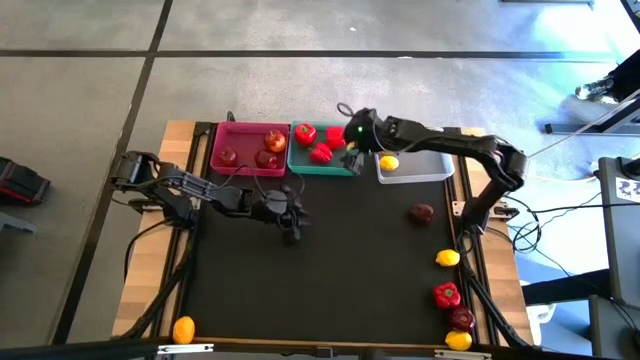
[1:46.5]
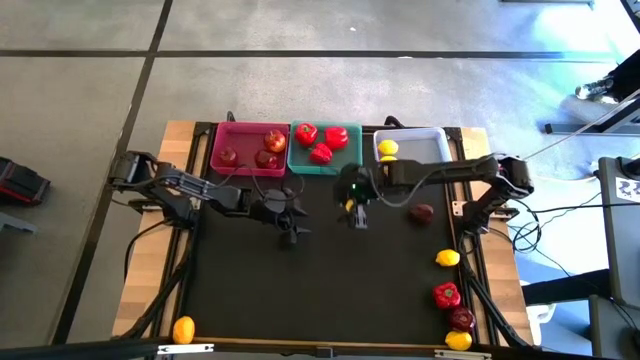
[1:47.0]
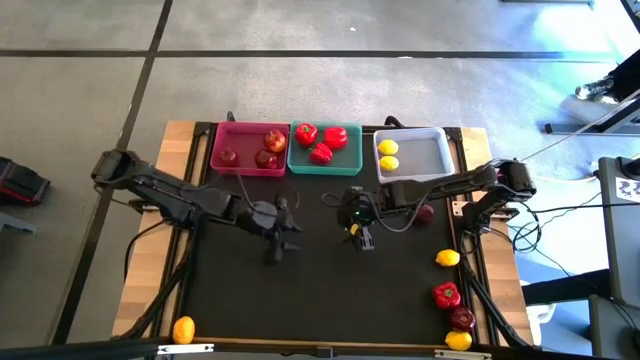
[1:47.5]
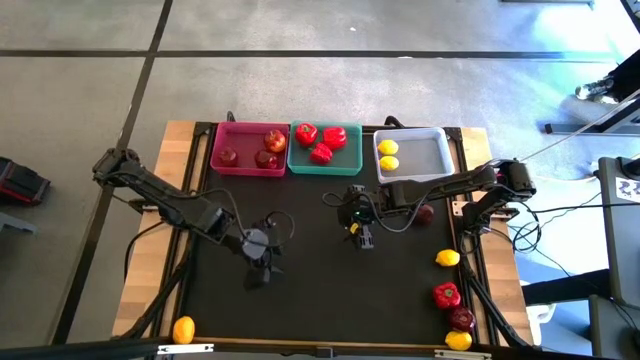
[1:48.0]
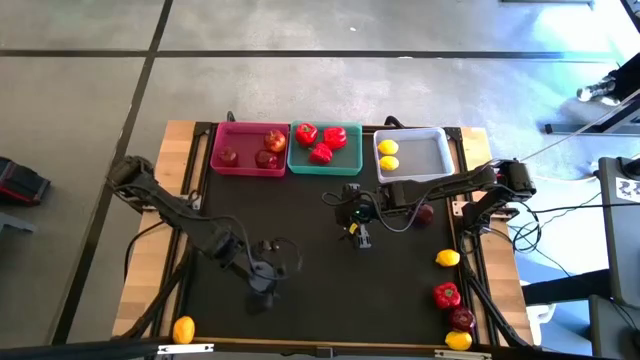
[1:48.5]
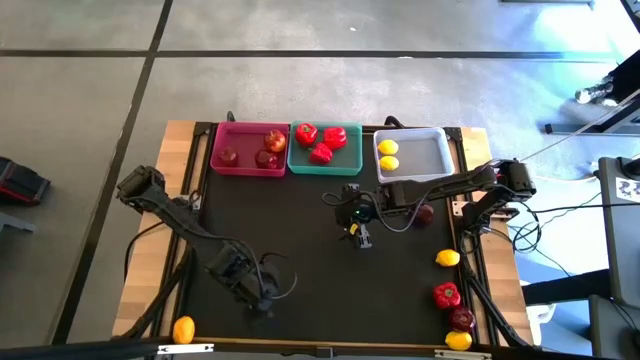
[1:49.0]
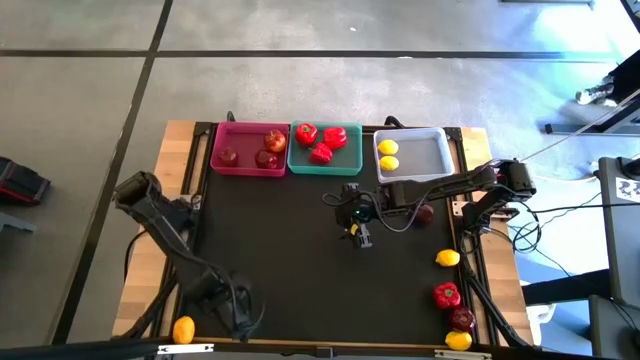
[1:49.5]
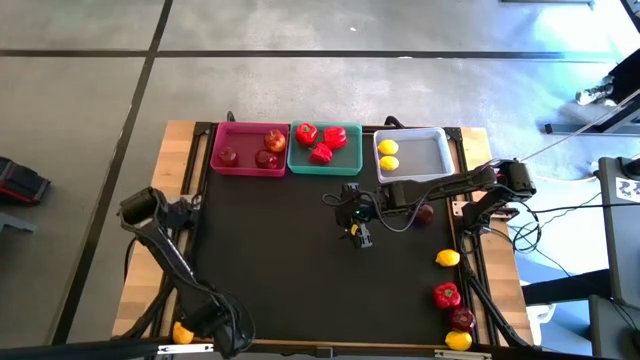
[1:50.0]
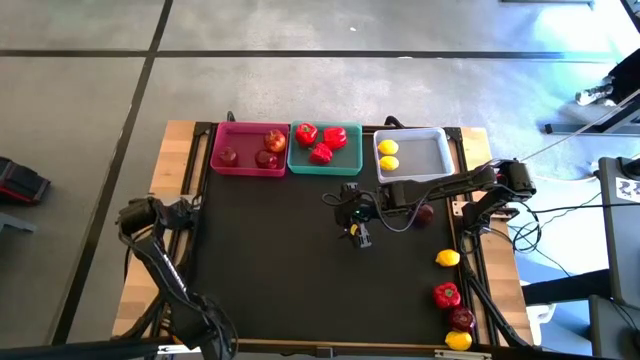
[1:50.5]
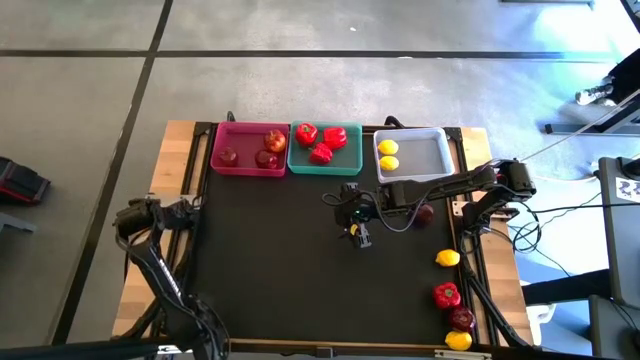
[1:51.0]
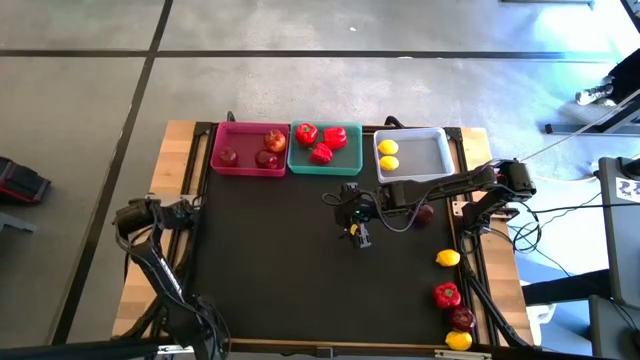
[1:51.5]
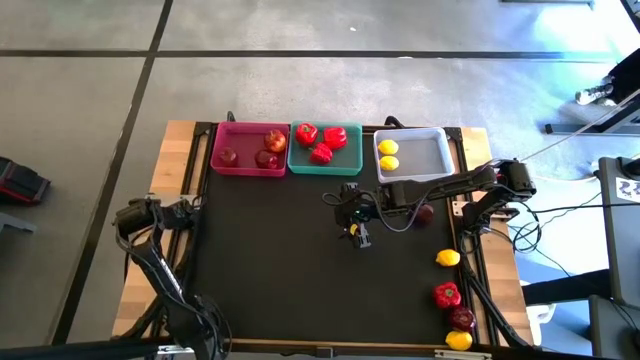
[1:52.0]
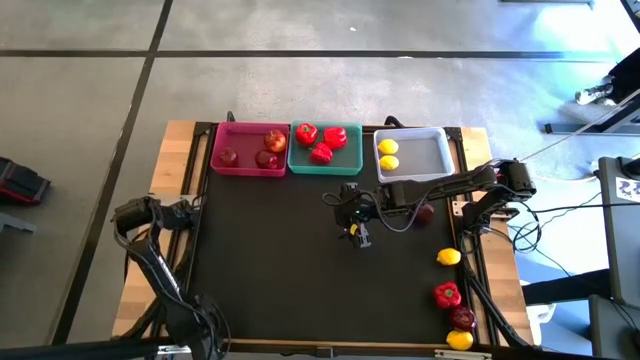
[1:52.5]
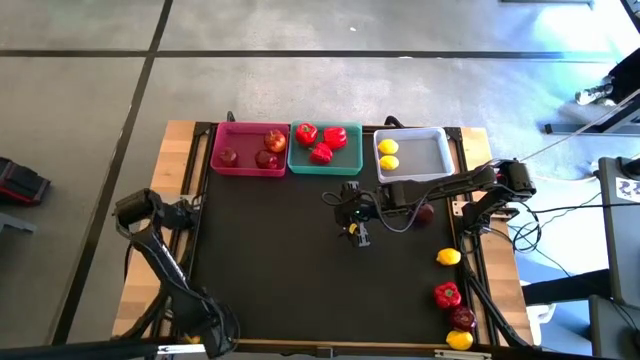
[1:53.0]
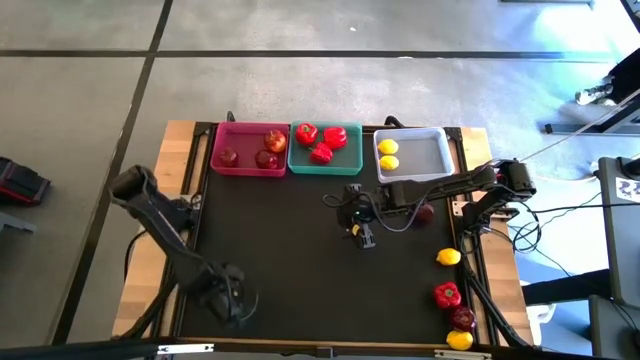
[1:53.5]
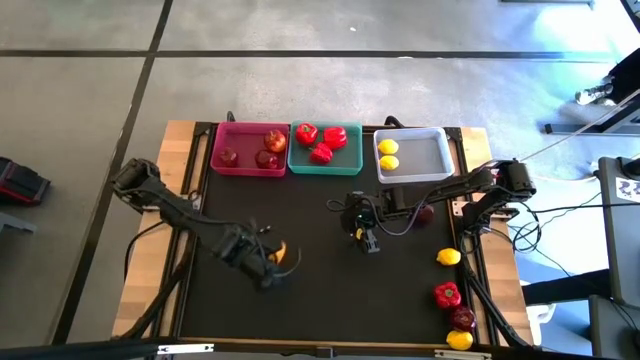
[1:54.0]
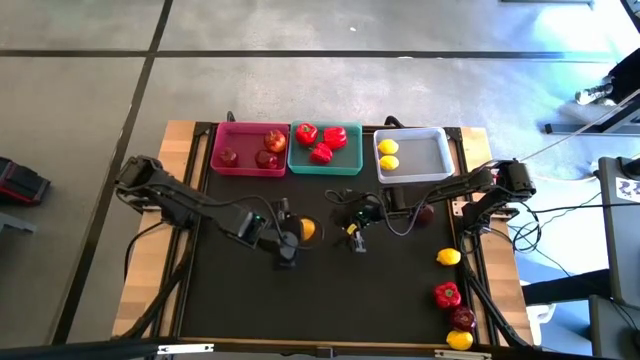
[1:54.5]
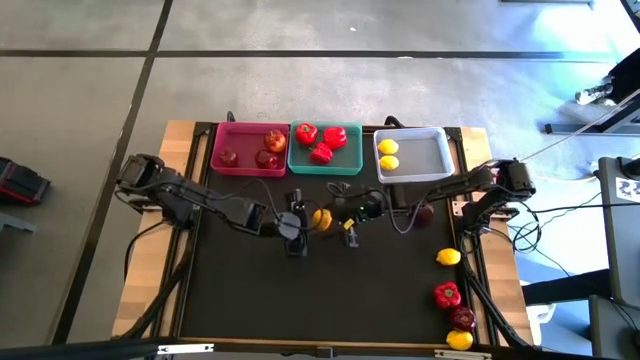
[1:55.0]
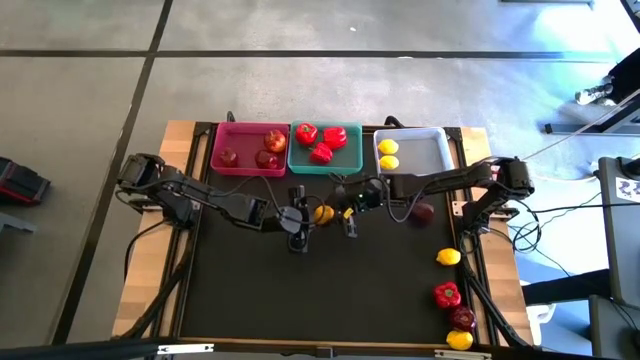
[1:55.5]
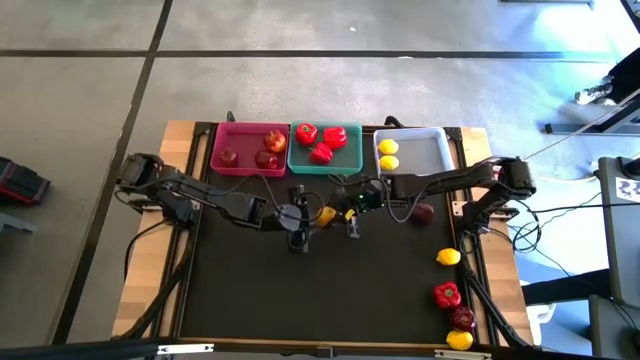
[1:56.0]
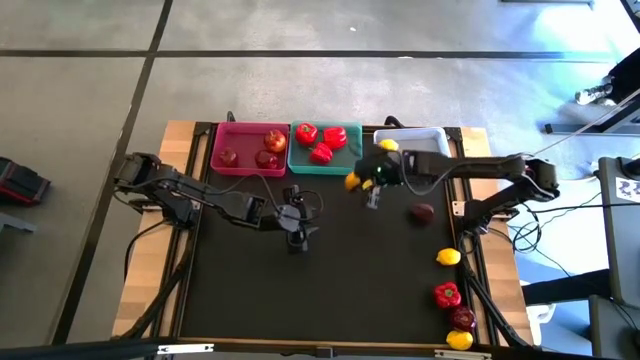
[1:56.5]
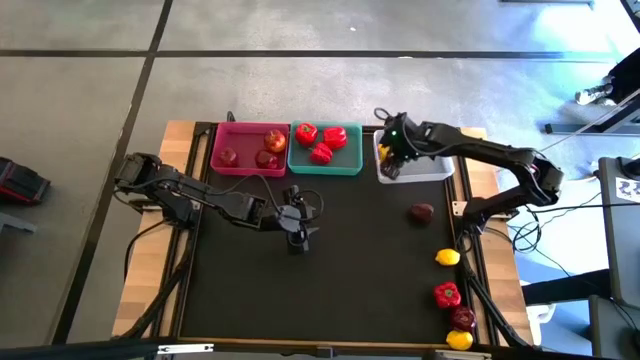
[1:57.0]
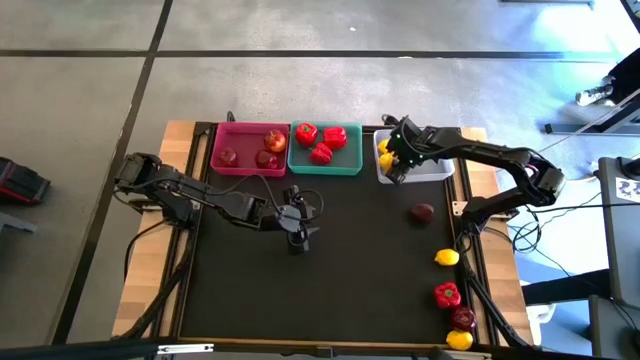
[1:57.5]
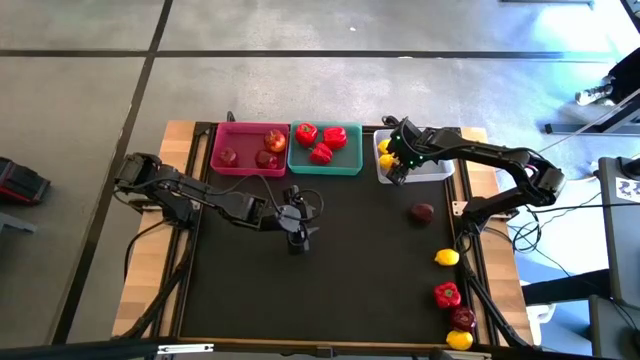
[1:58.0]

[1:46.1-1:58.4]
Task: Sort produce into baskets
Put the lemon into the white bin

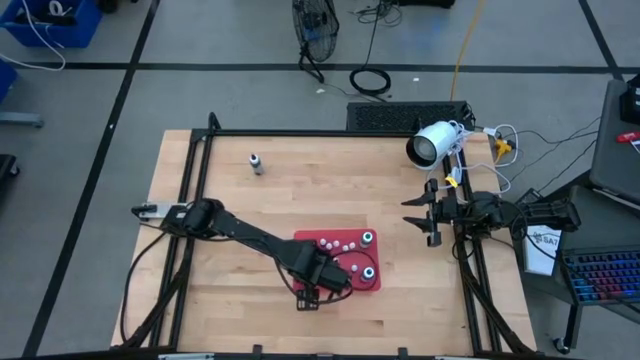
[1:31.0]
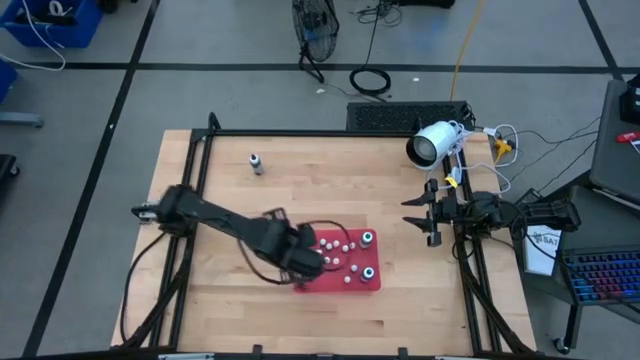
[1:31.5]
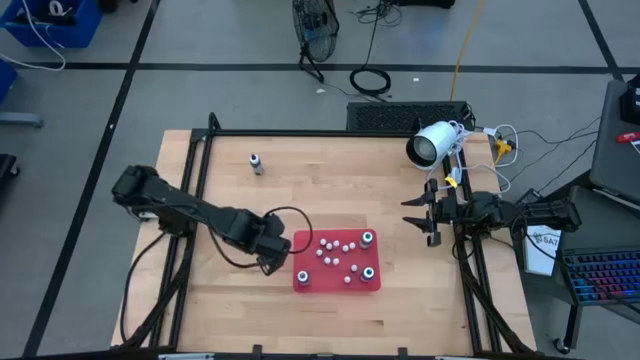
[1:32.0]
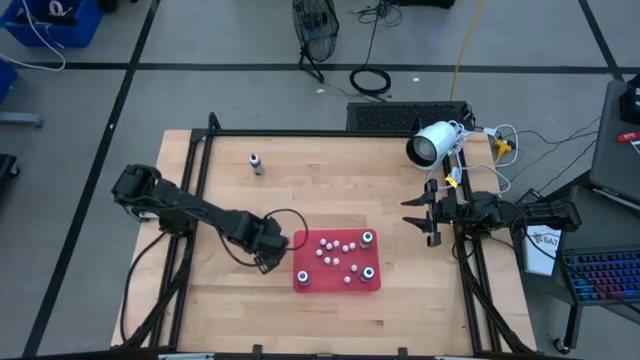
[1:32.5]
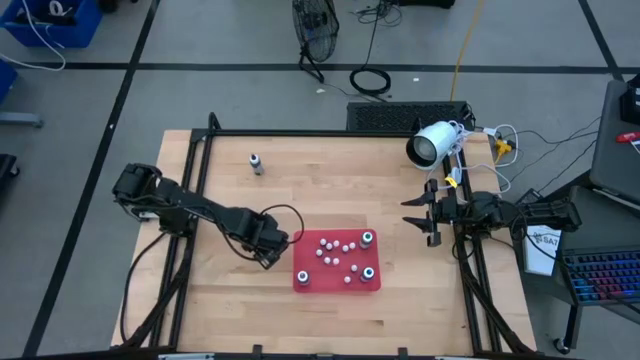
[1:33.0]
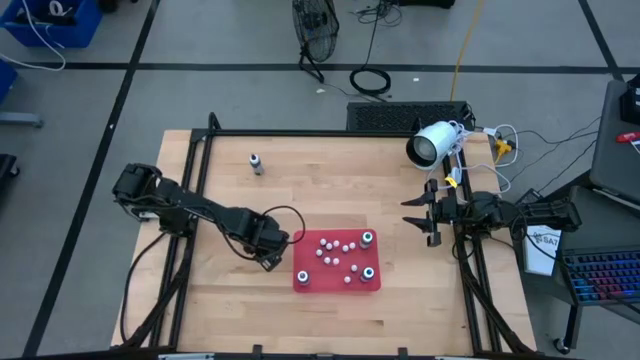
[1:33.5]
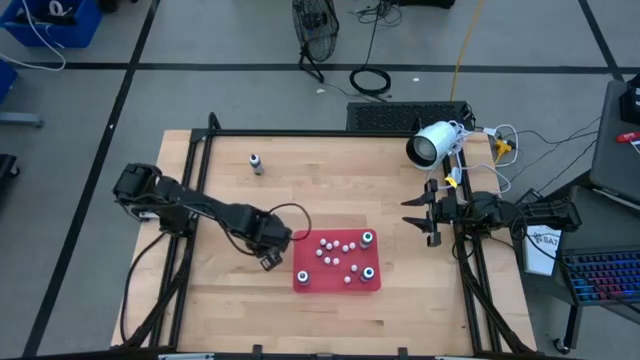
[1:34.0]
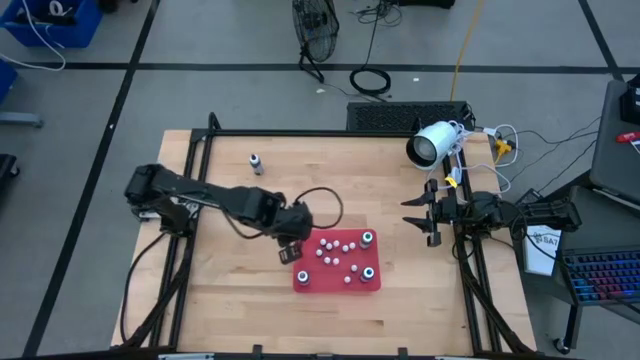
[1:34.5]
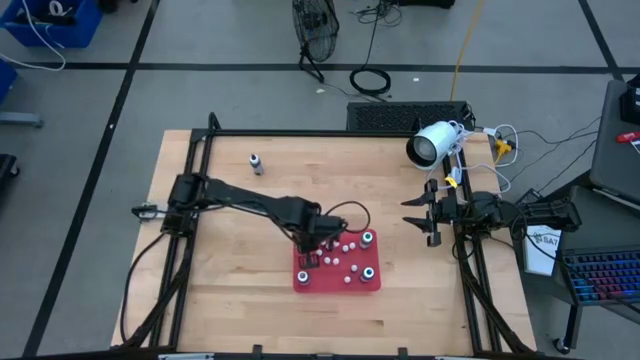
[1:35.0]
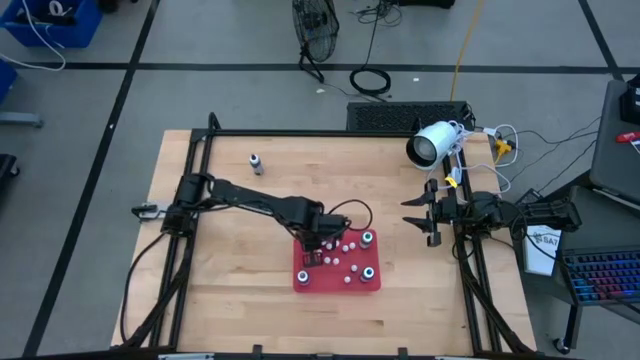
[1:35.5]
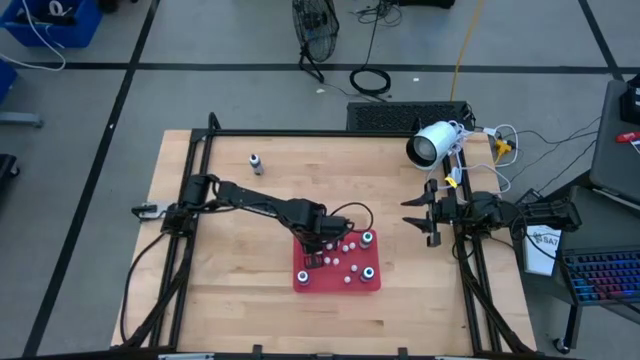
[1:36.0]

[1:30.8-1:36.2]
Task: Pick & Place food coloring
Put the small orange food coloring bottle into the red bin

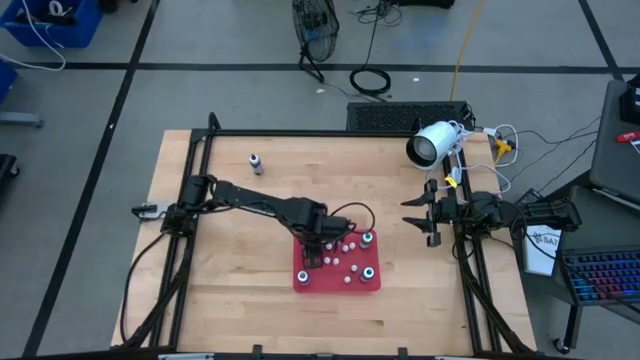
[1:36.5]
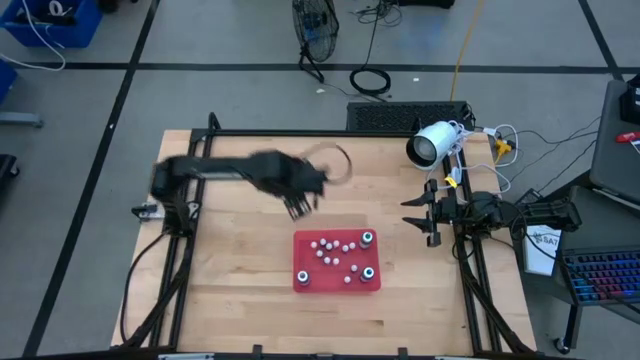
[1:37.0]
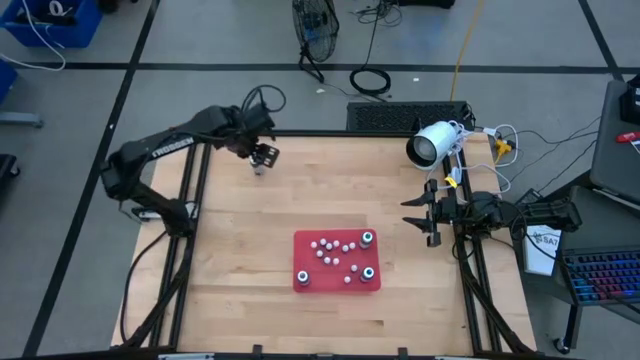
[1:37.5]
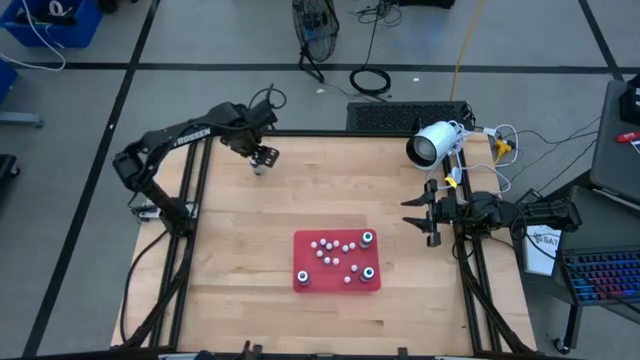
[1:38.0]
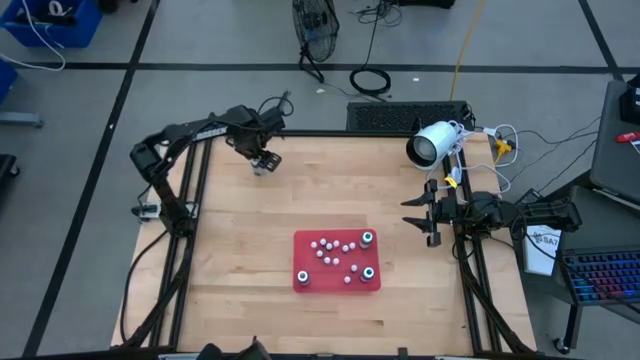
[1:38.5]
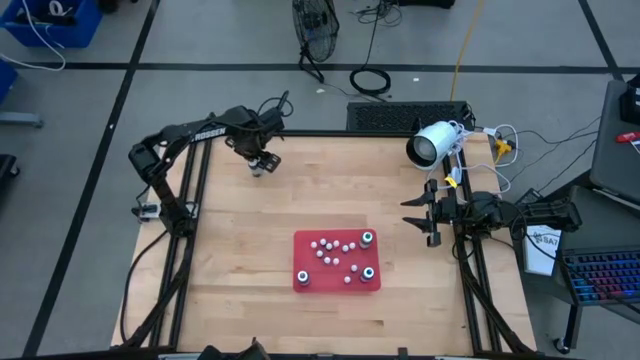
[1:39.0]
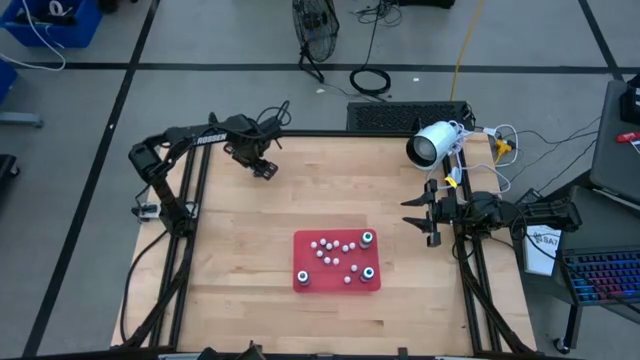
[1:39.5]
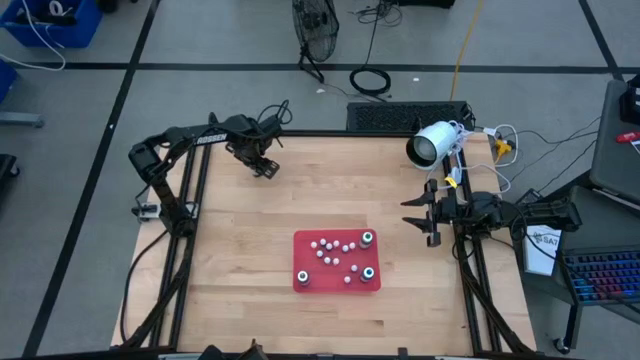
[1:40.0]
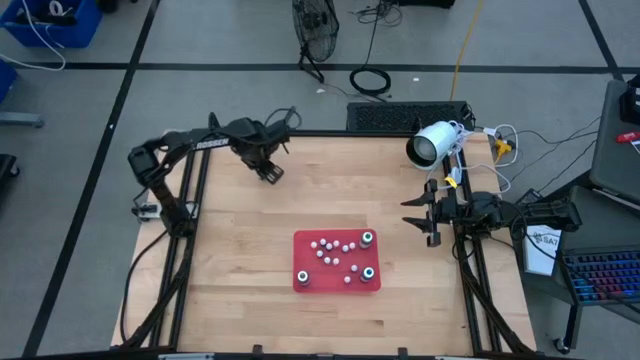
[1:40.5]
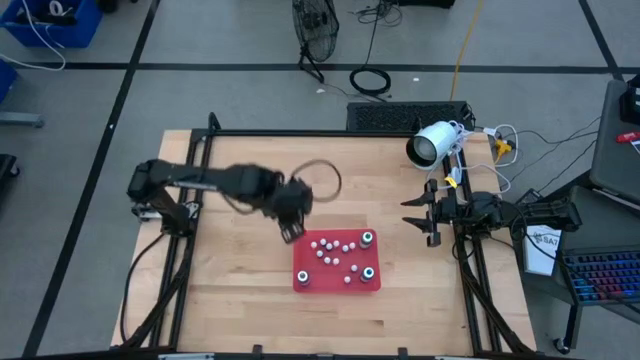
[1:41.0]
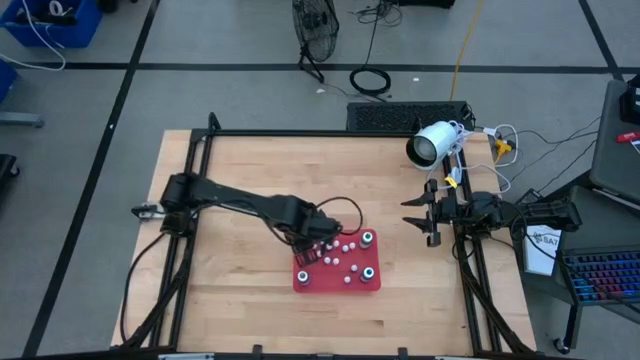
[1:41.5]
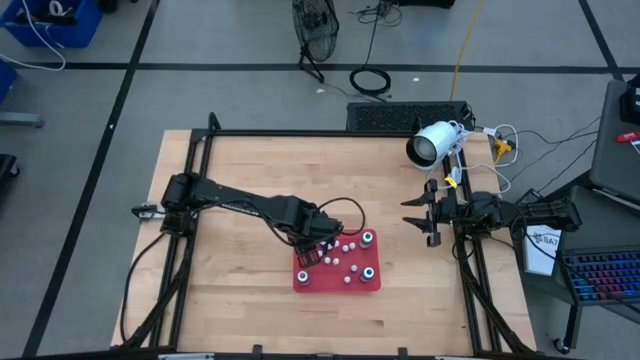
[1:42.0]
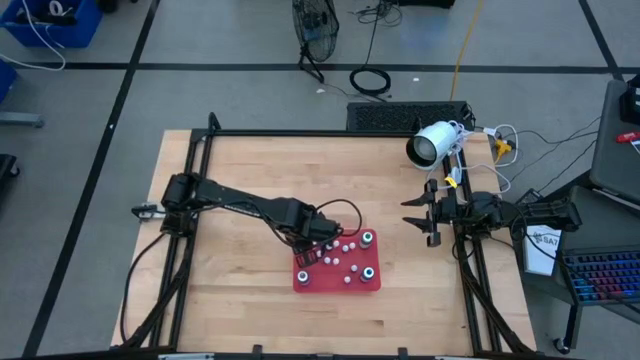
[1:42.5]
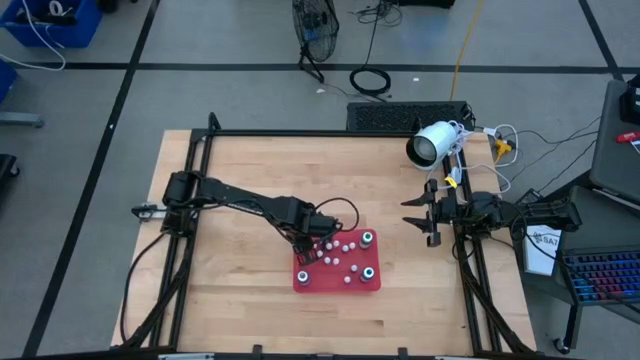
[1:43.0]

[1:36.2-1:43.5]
Put the small black food coloring bottle into the red bin
